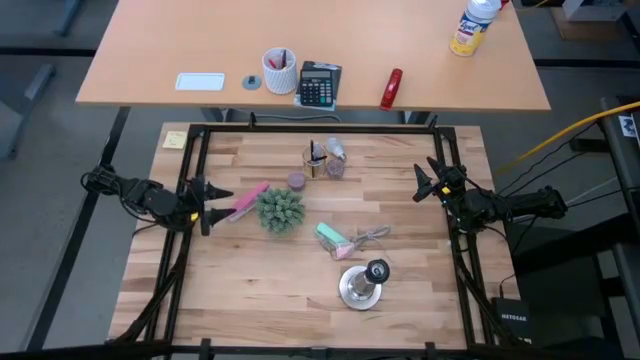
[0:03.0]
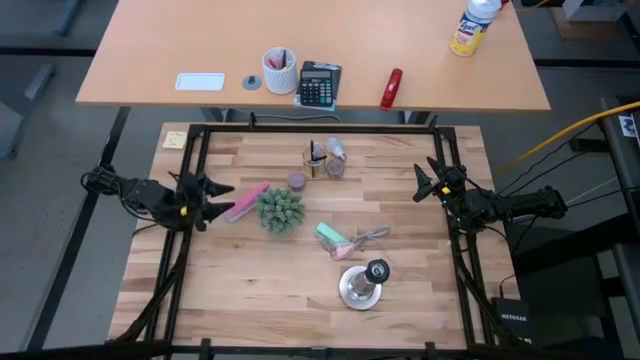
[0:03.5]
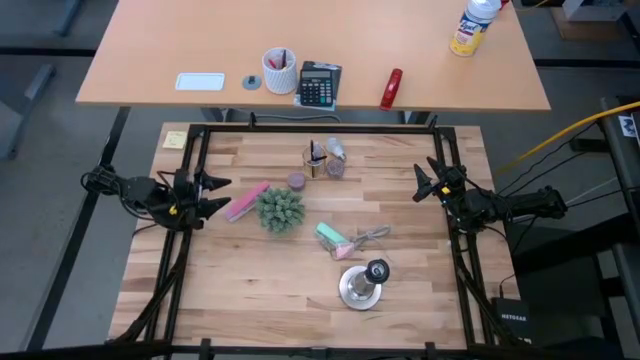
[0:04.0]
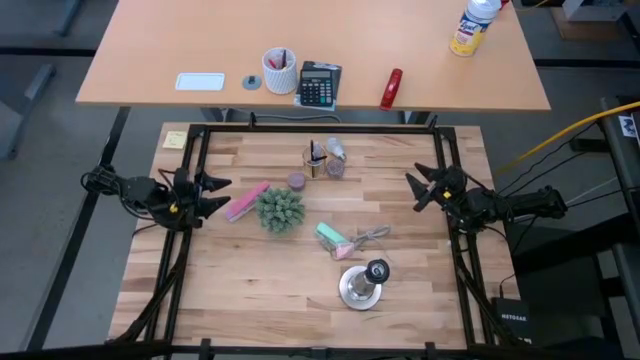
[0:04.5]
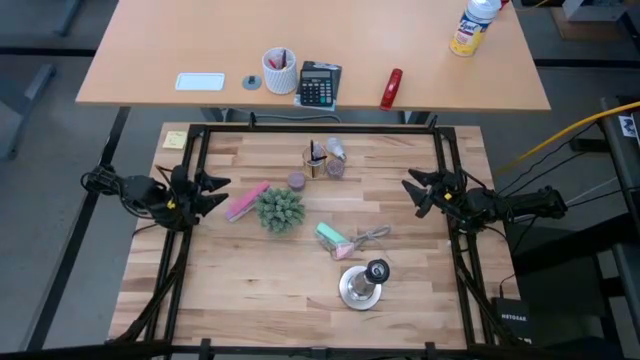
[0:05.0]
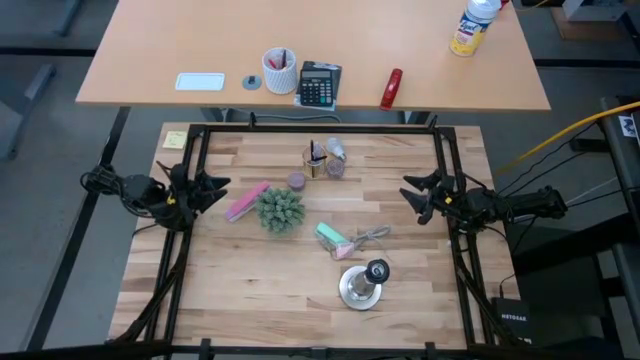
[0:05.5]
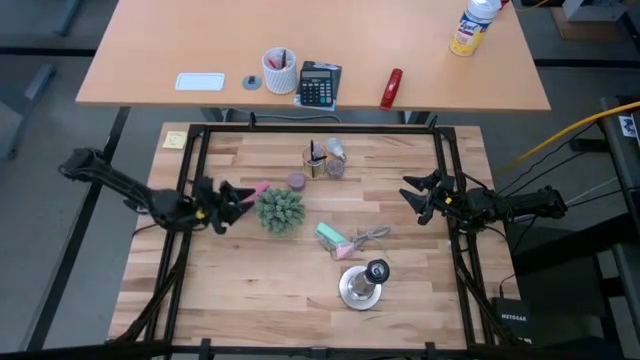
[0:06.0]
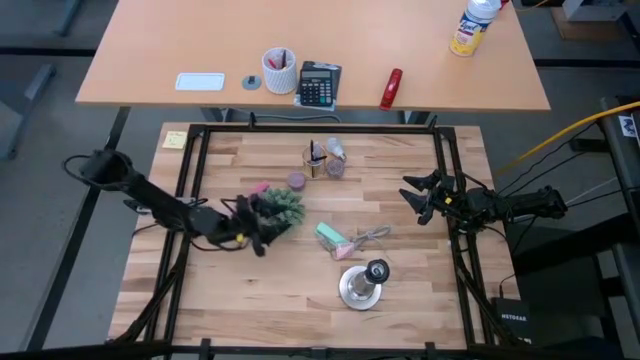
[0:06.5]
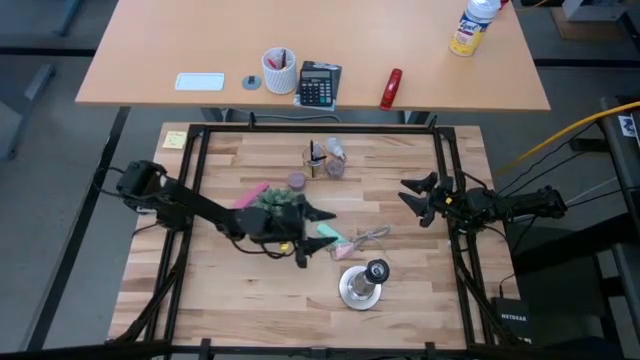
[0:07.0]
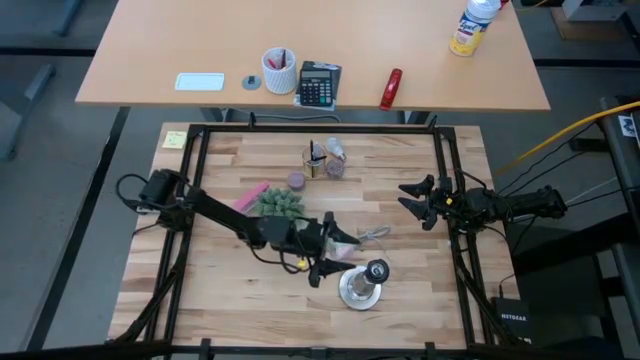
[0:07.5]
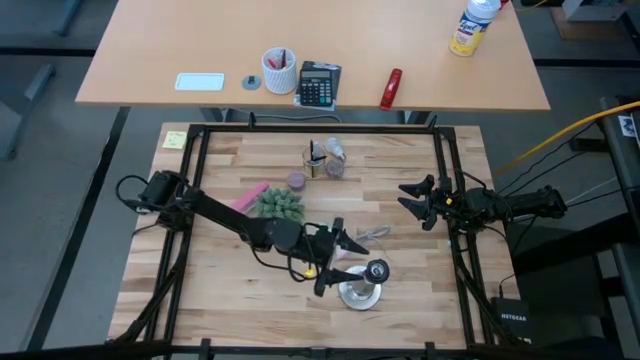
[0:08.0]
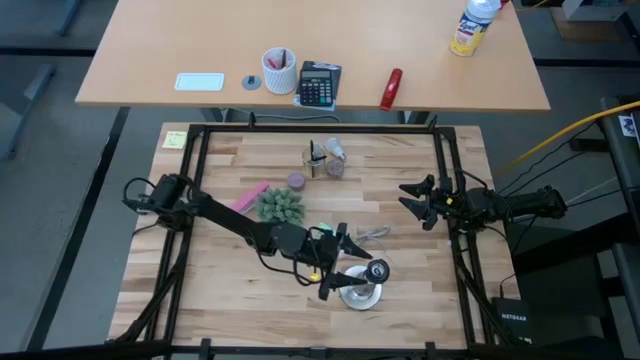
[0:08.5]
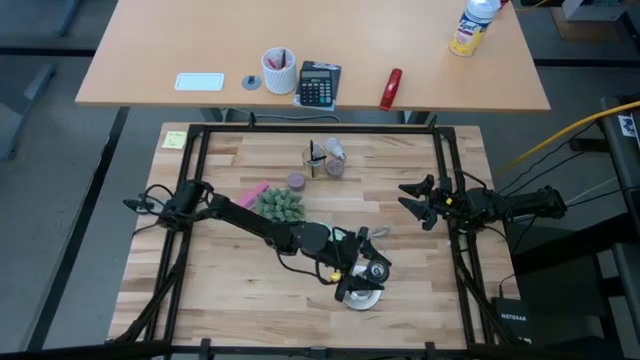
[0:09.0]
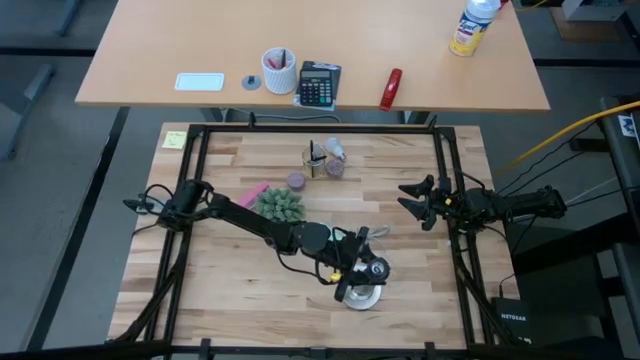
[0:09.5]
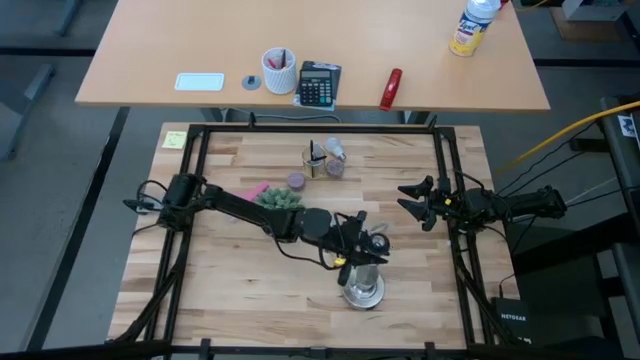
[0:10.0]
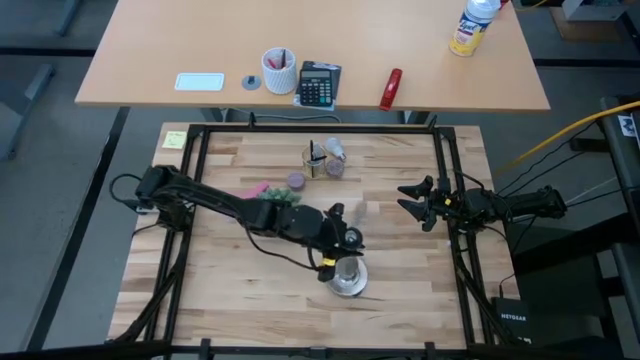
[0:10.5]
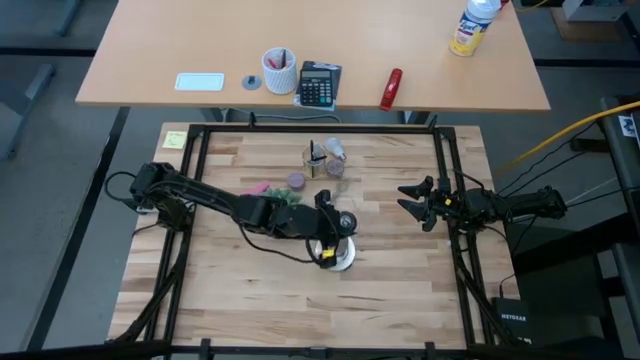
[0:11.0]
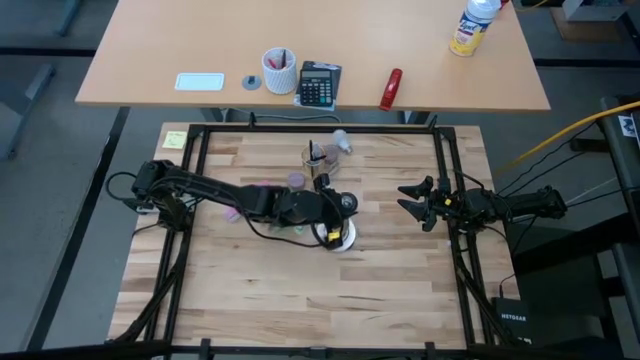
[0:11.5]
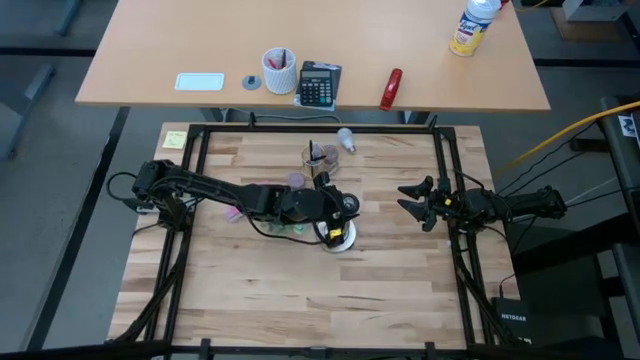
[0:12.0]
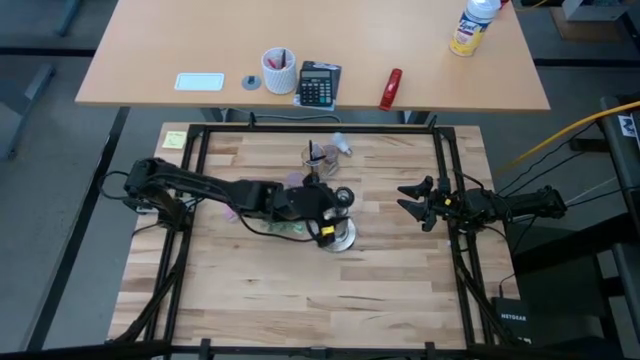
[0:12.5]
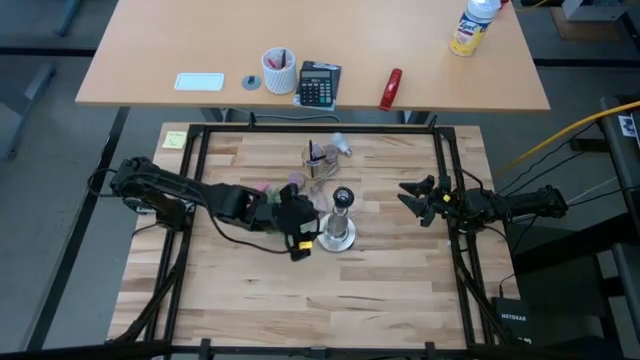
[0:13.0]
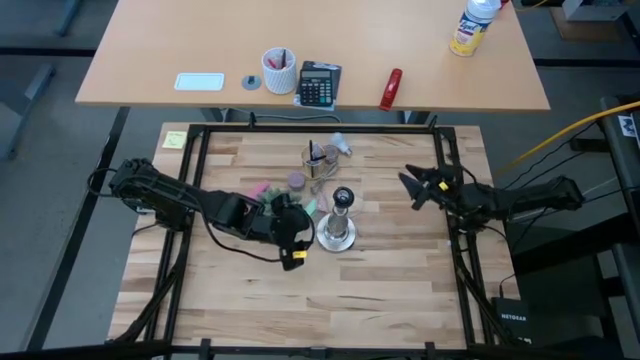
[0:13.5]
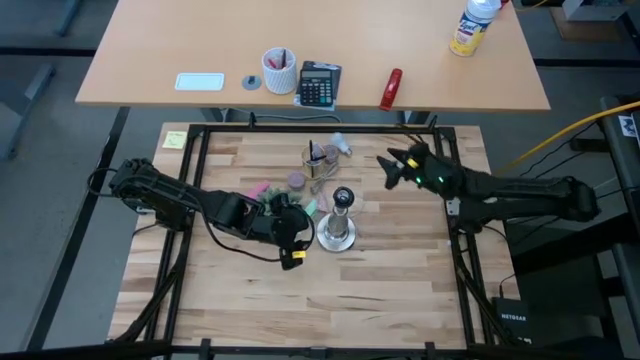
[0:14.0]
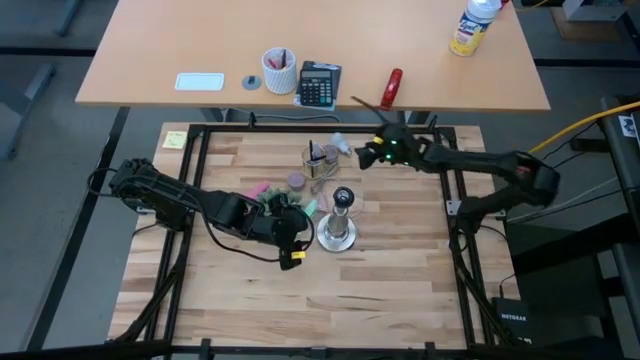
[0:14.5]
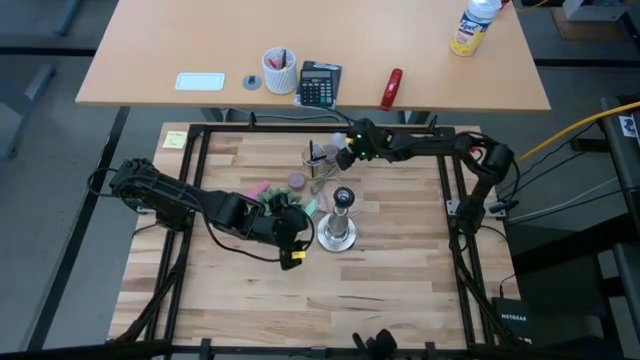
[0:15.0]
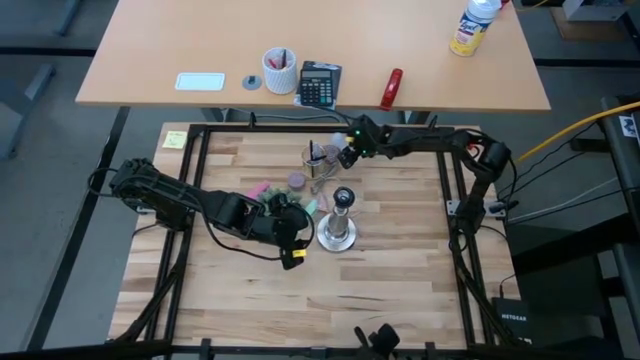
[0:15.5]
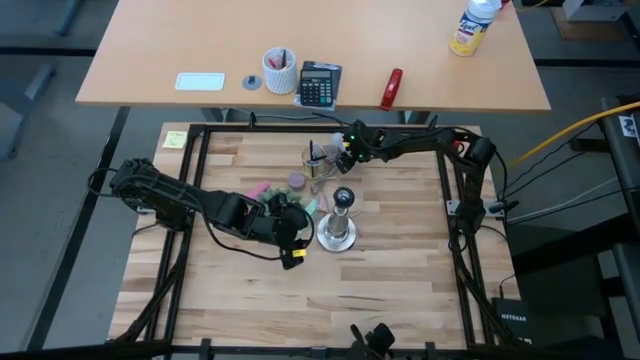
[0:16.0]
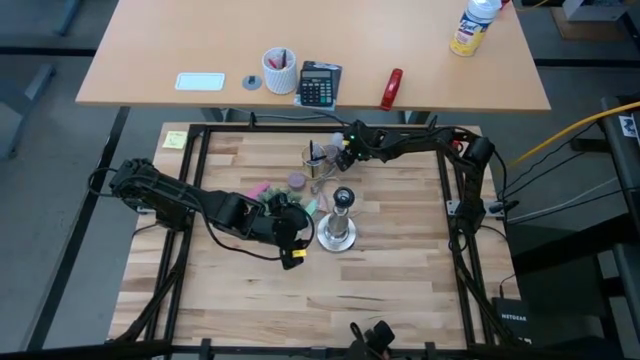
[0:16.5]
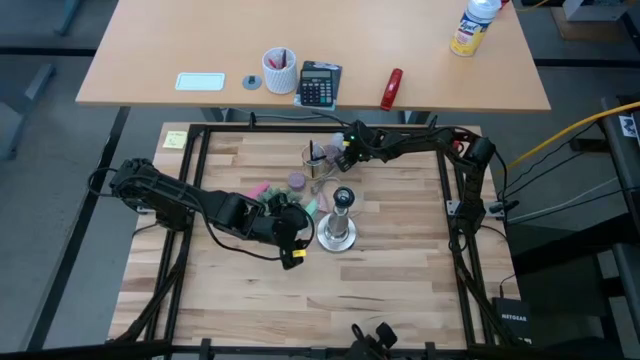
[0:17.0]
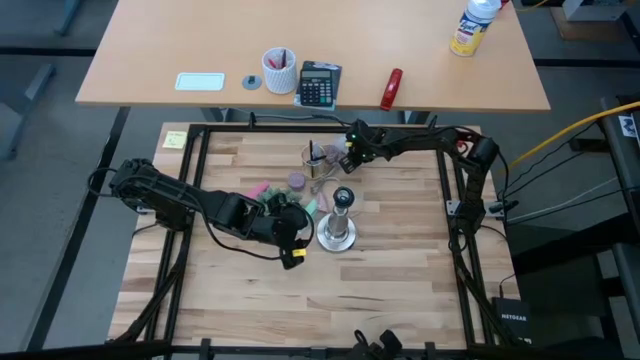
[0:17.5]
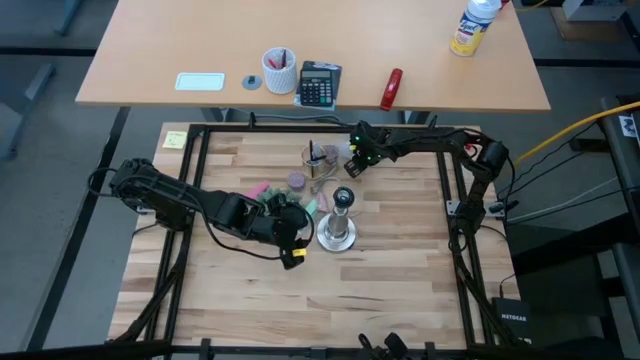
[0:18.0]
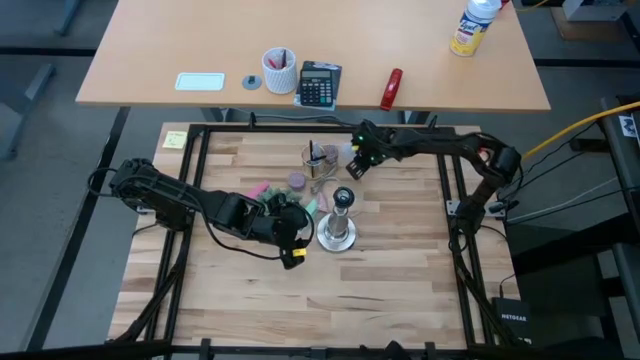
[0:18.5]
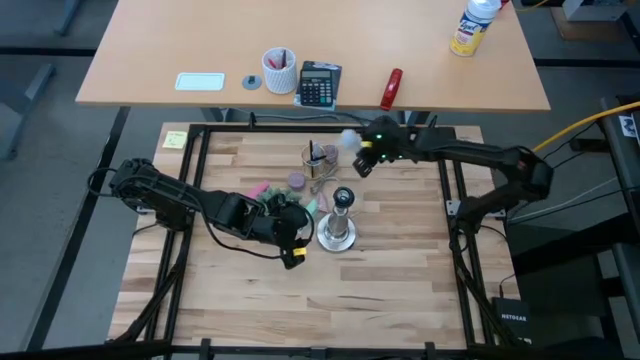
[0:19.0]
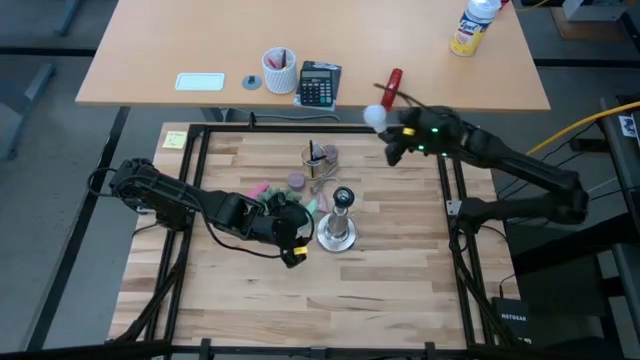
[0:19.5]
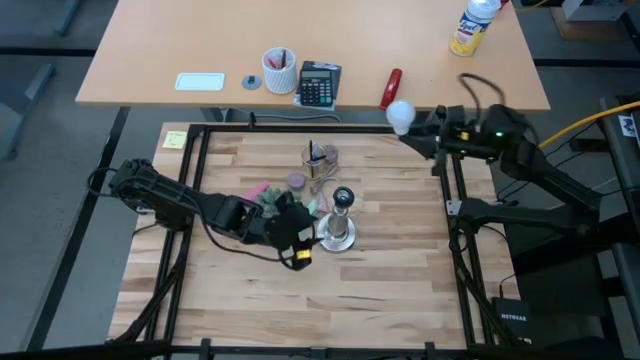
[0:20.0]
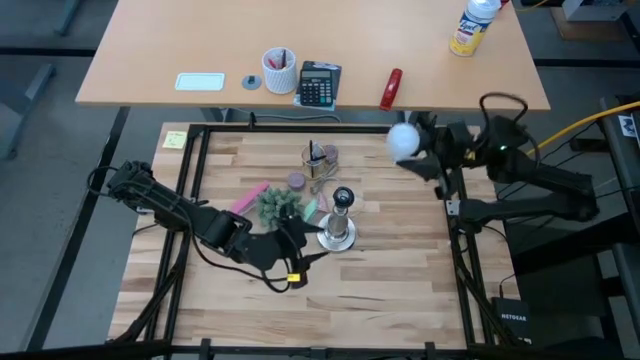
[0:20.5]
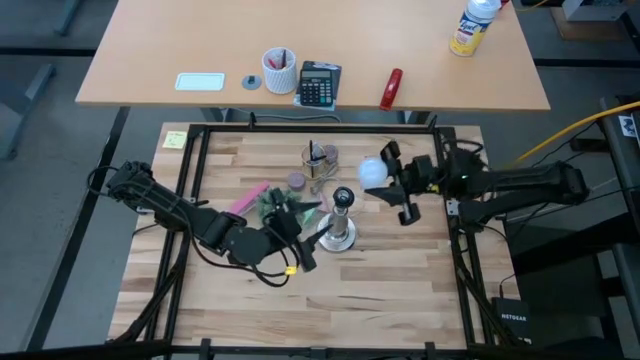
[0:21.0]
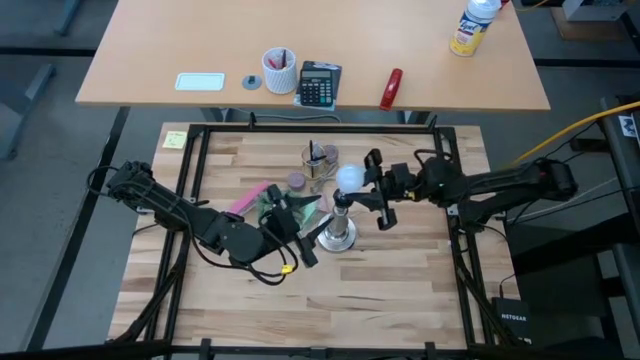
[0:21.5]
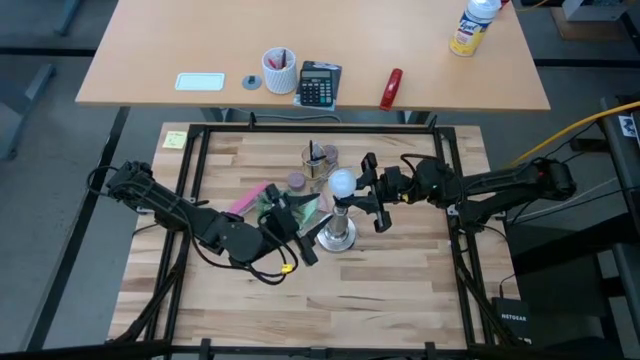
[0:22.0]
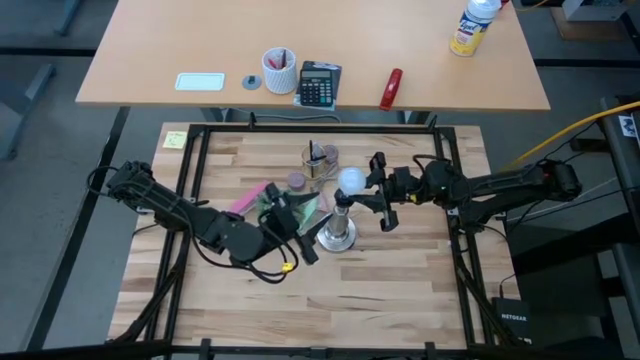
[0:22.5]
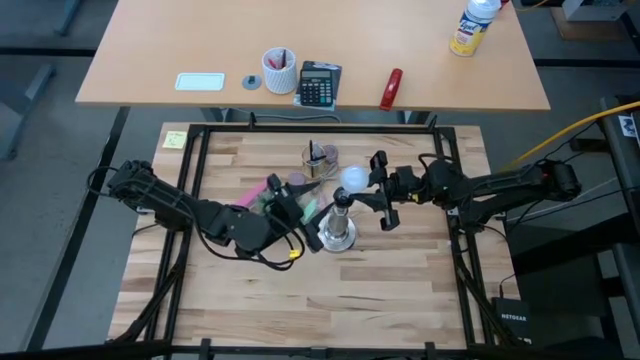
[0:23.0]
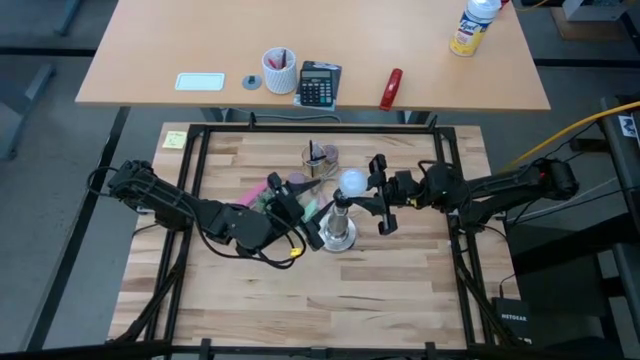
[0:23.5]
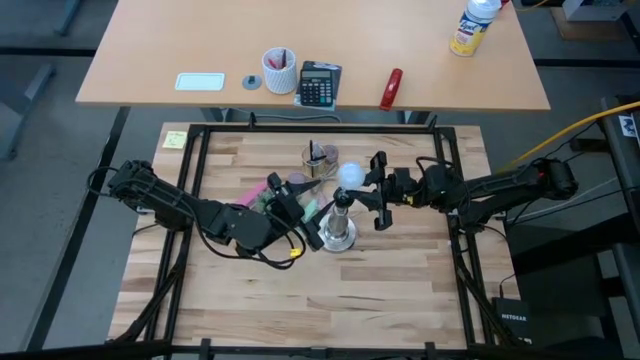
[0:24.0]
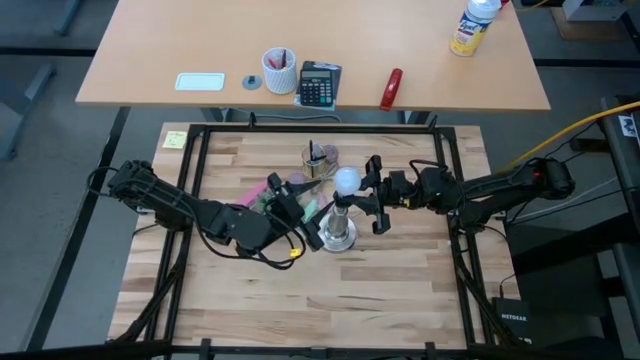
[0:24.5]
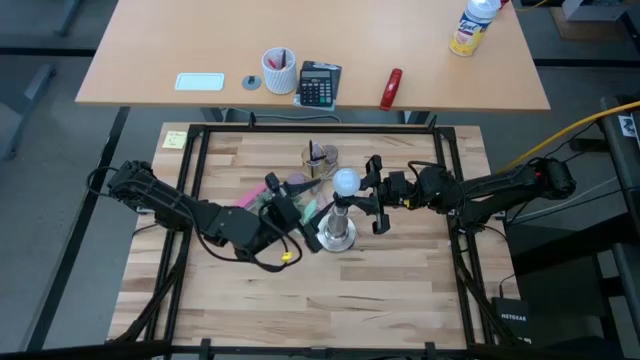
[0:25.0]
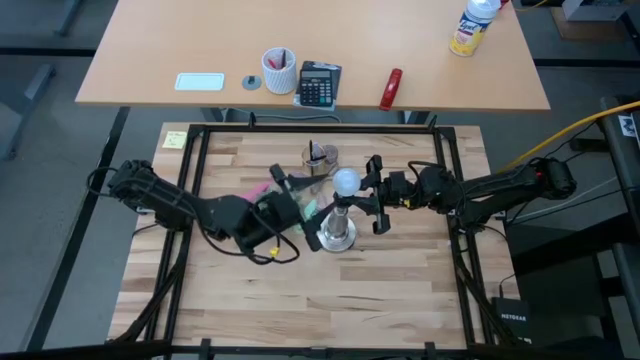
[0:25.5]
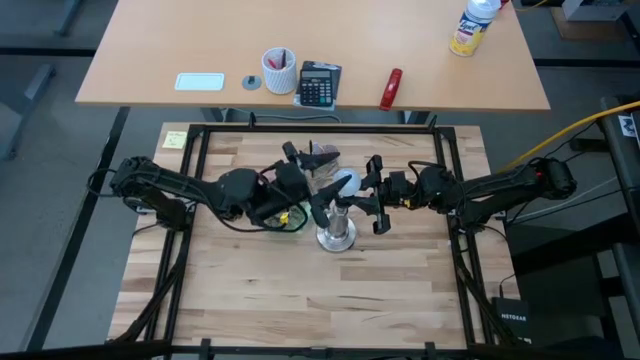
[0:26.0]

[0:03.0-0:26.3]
Task: Screw lightbulb
Insert the lightbulb into the lamp
